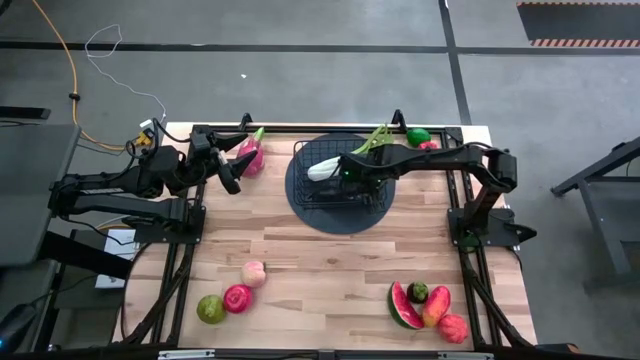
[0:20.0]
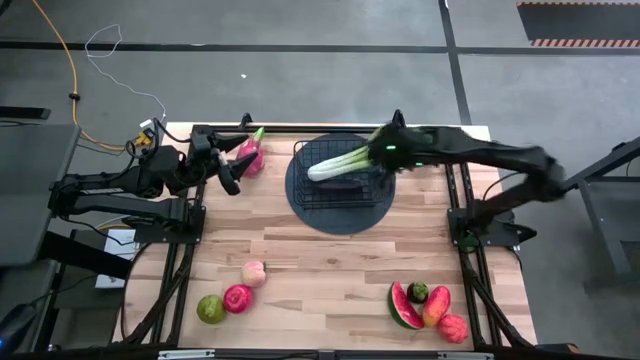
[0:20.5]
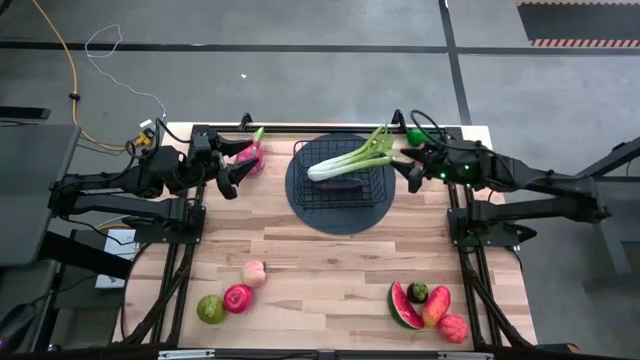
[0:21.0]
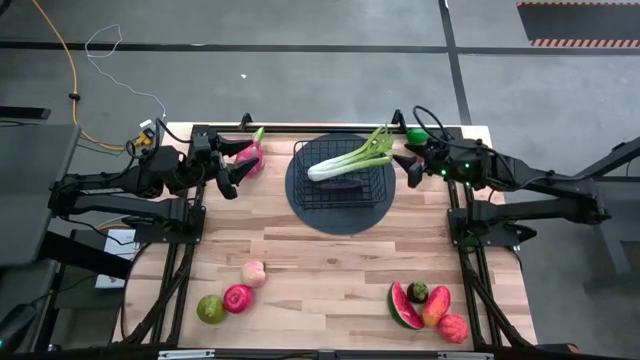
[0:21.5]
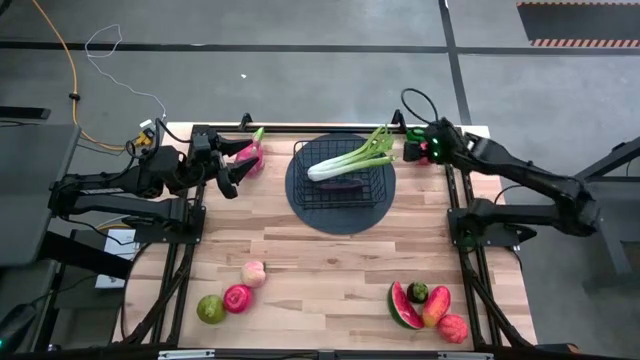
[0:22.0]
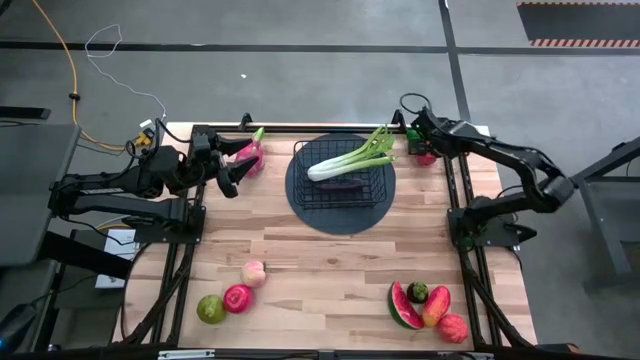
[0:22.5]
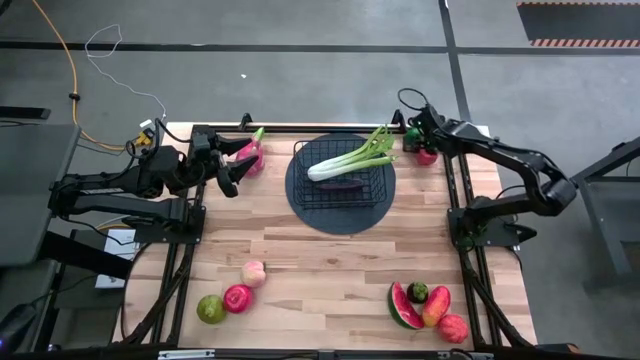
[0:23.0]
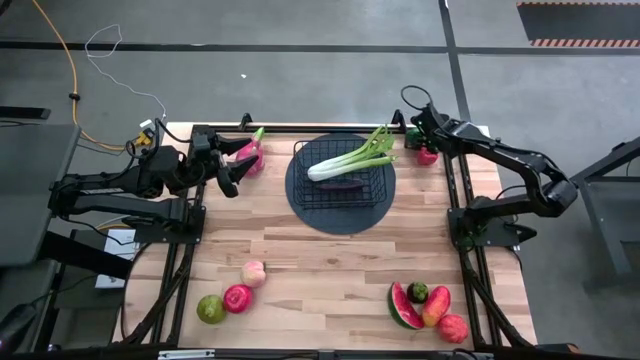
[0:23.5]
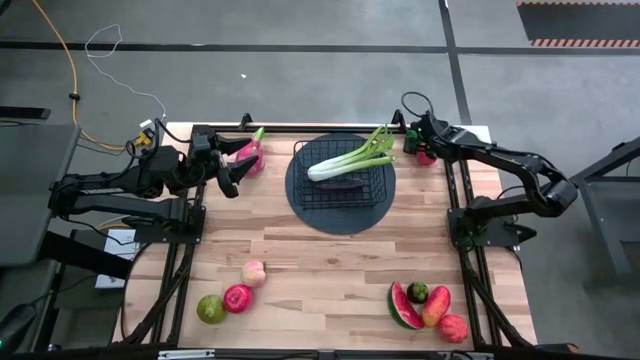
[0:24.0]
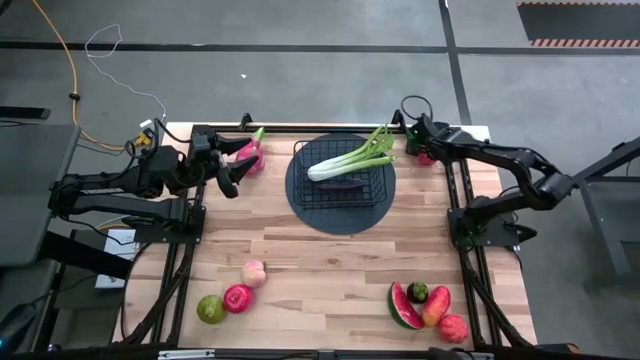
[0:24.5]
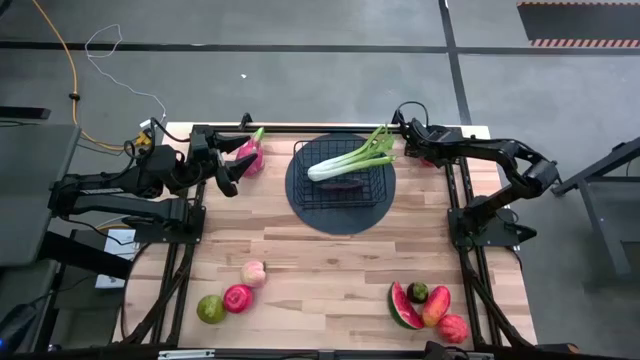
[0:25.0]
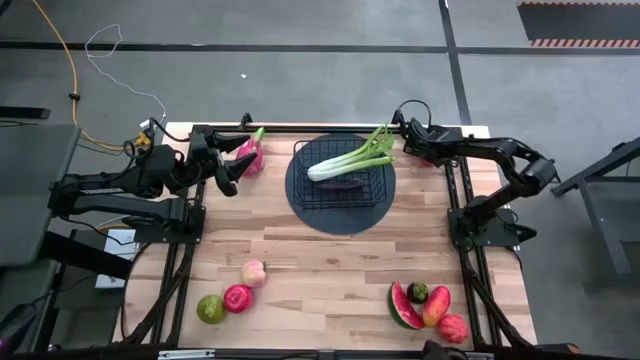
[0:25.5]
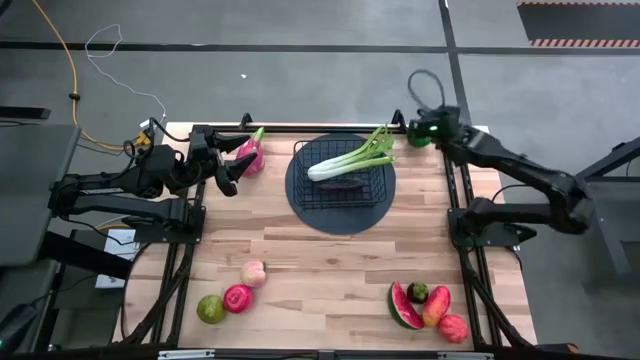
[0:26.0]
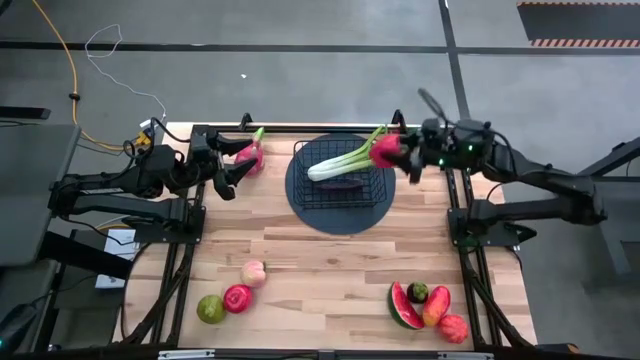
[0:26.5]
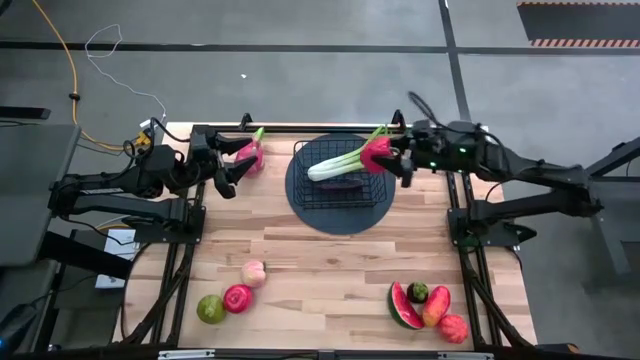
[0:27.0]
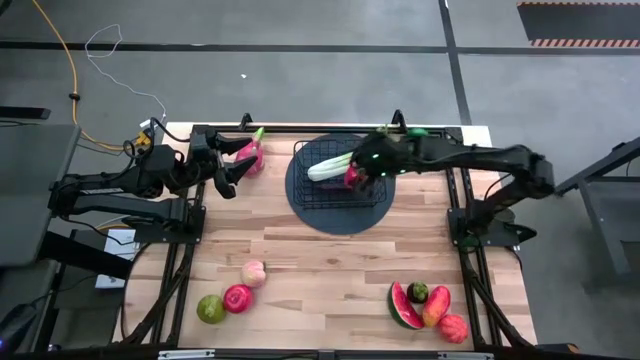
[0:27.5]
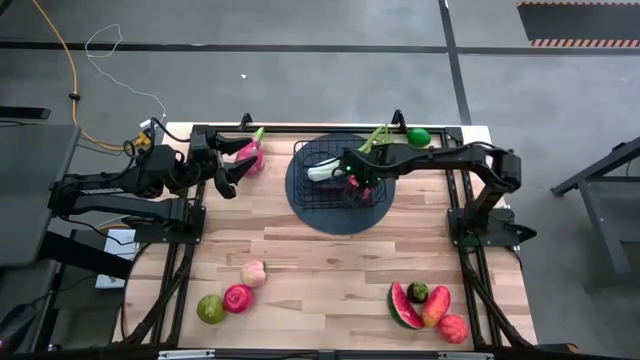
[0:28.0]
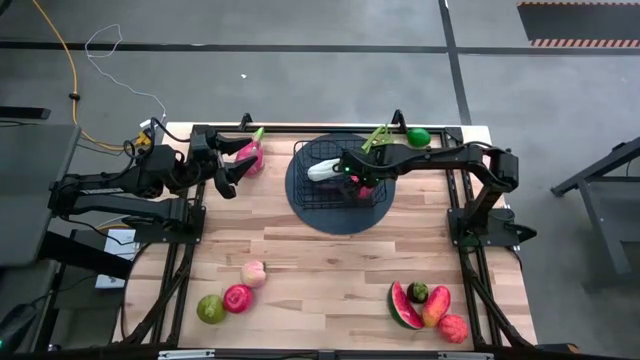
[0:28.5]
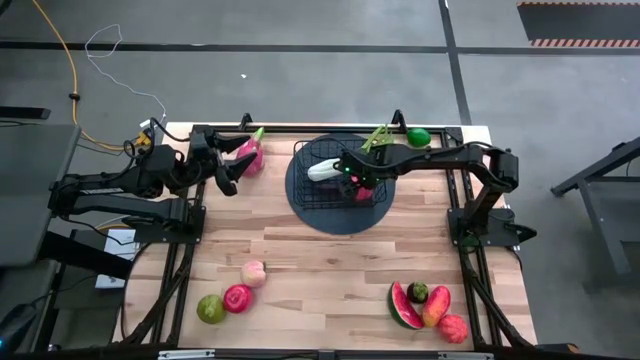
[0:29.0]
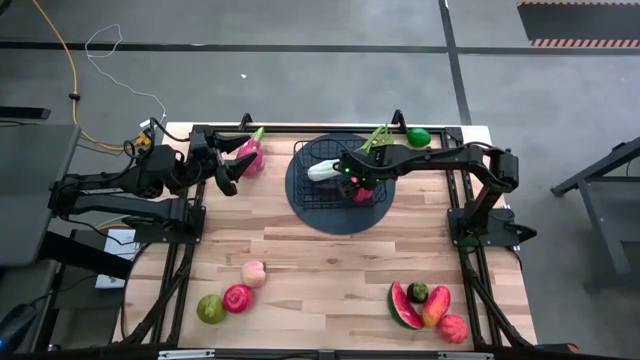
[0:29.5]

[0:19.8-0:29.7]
Task: Build produce basket
Put the bell pepper into the wire basket

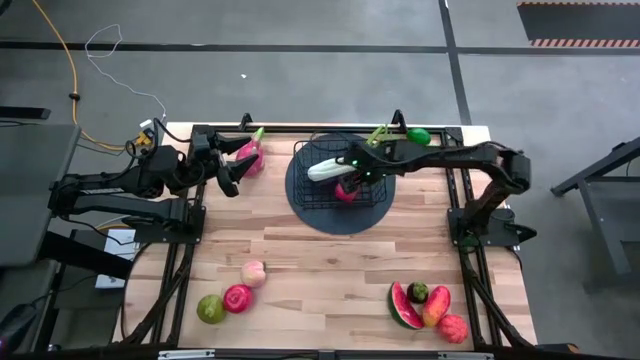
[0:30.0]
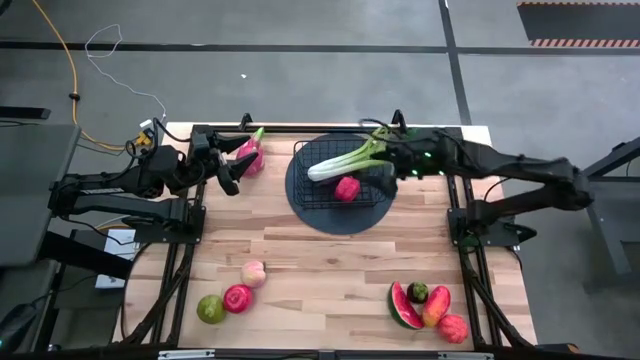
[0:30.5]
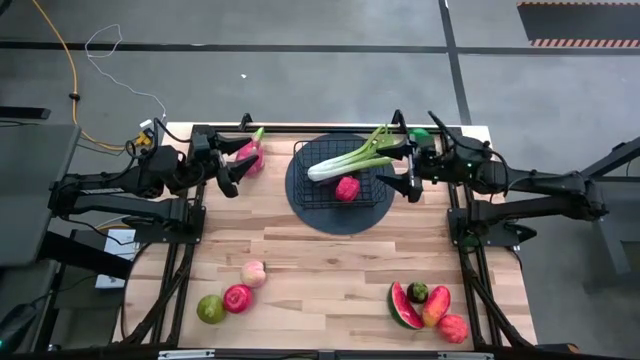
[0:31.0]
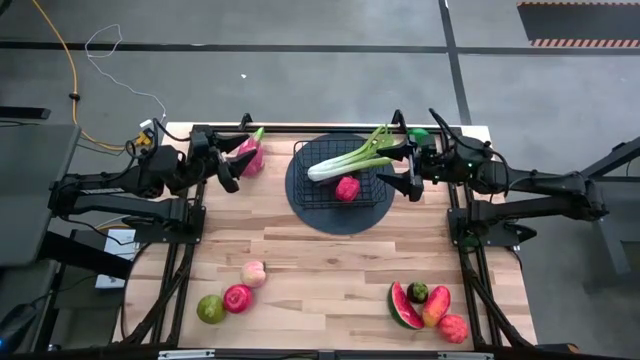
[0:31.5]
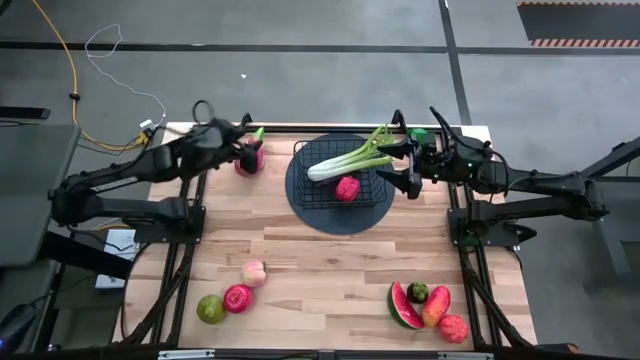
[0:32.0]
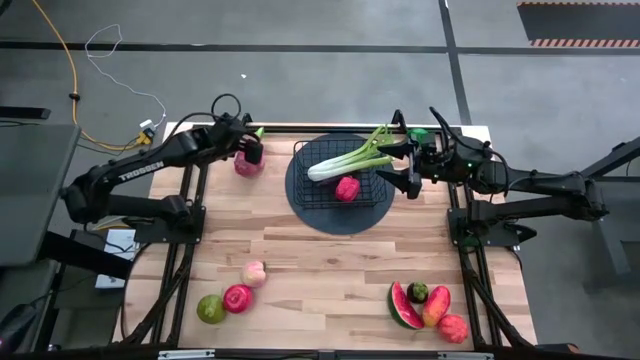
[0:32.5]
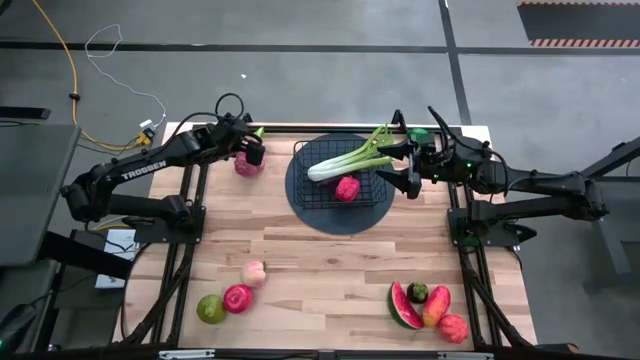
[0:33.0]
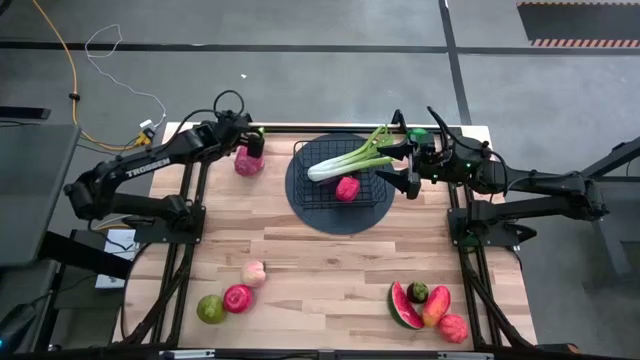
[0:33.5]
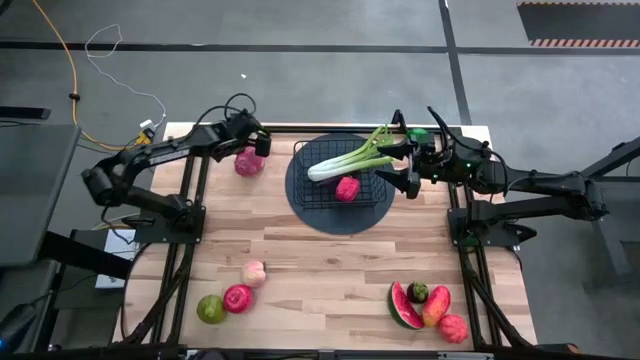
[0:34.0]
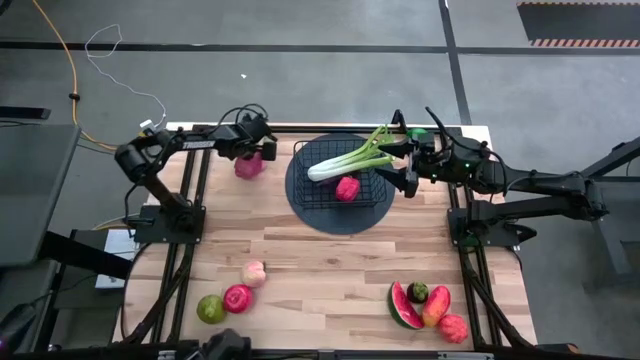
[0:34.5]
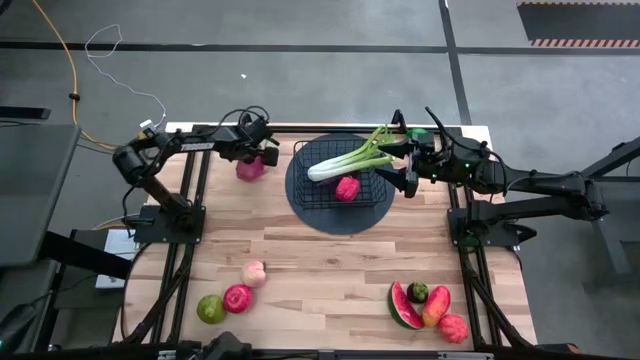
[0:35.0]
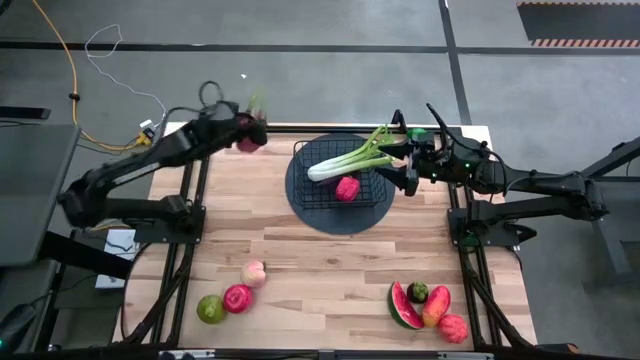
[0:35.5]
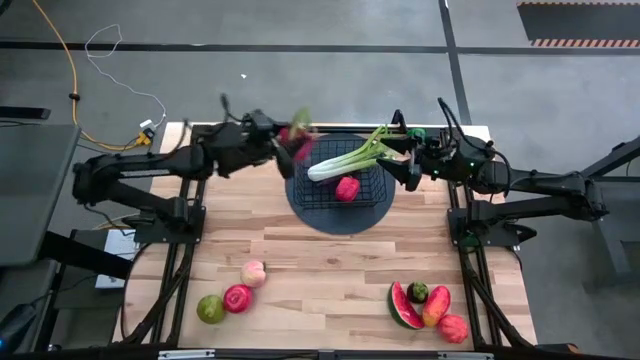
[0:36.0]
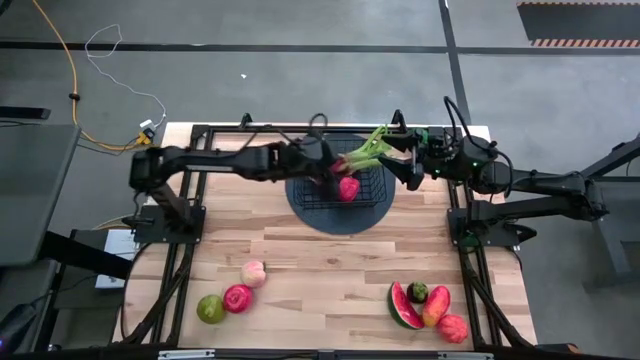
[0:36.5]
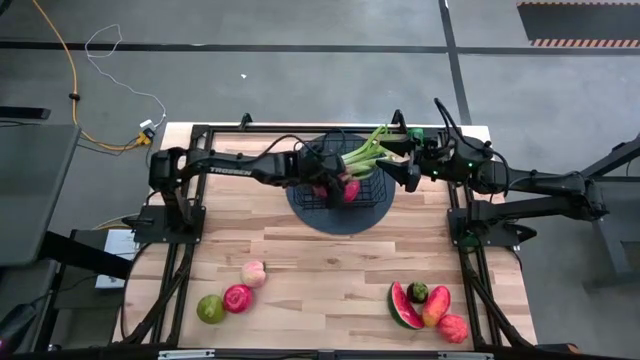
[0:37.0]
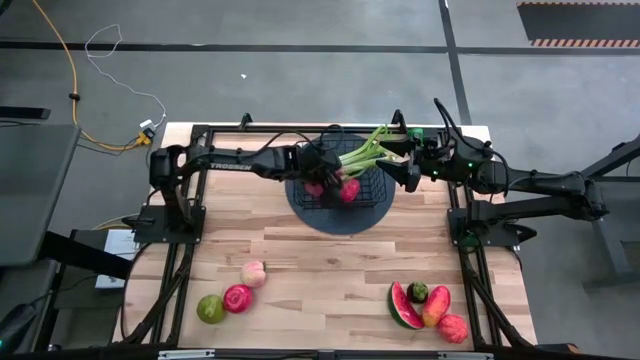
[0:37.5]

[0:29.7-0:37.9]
Put the dragon fruit into the wire basket

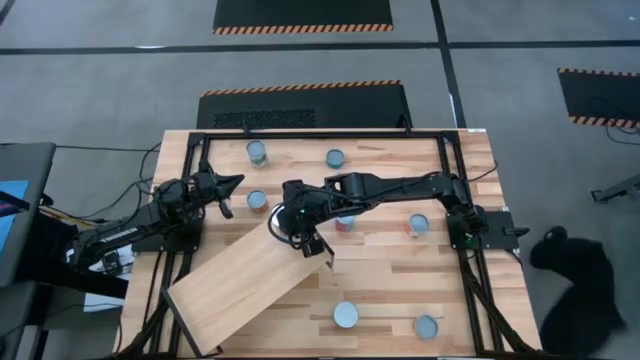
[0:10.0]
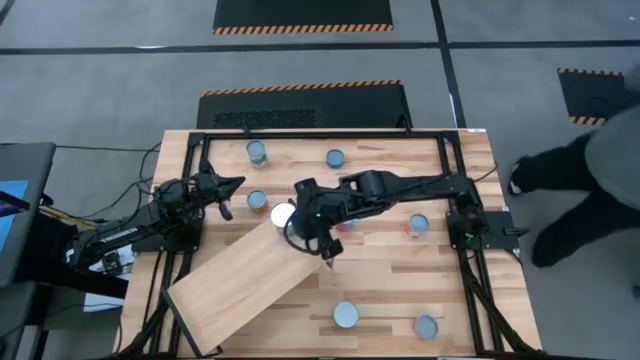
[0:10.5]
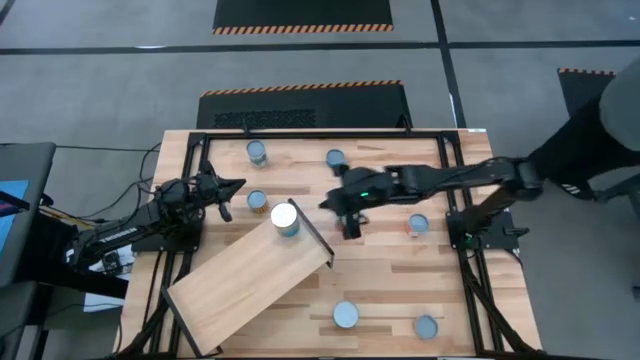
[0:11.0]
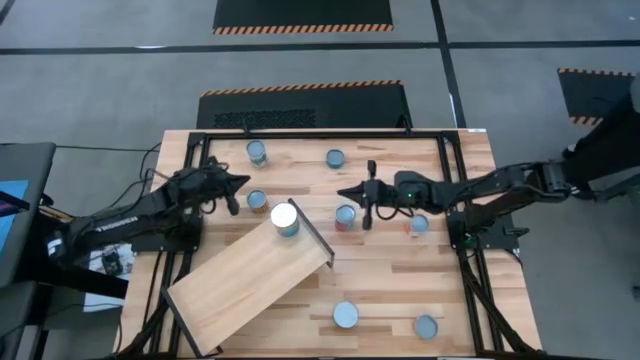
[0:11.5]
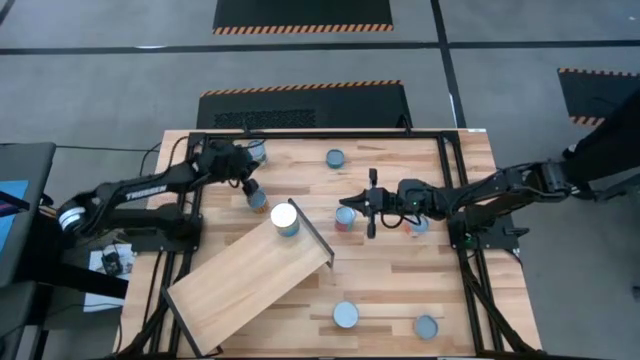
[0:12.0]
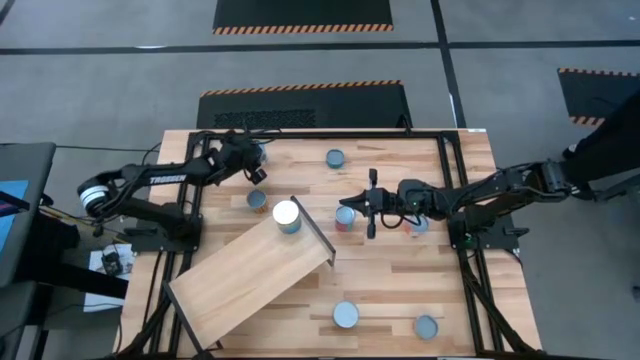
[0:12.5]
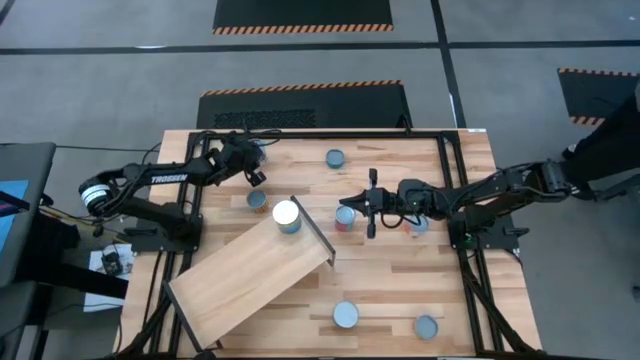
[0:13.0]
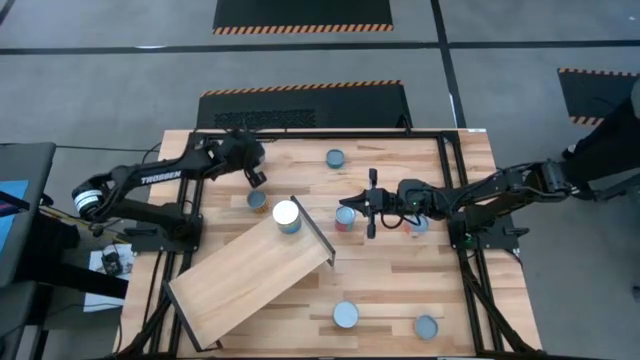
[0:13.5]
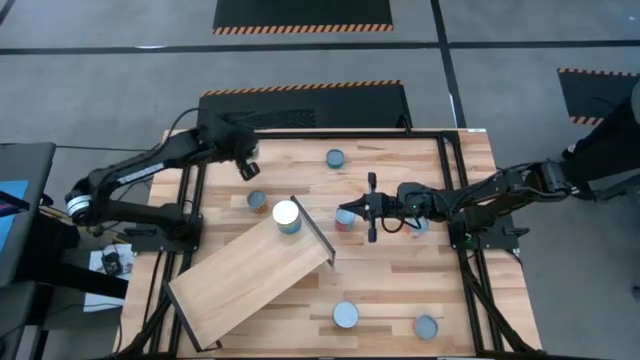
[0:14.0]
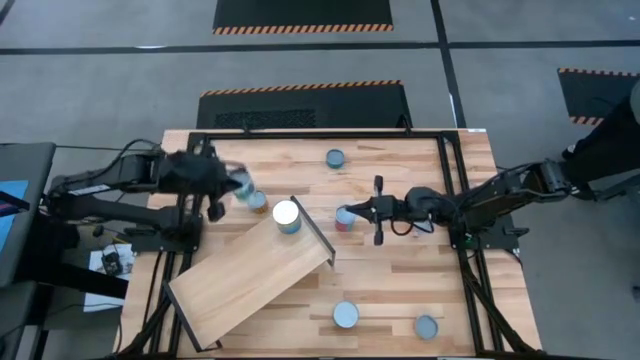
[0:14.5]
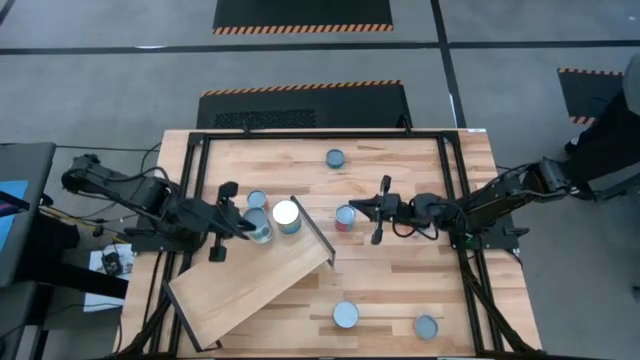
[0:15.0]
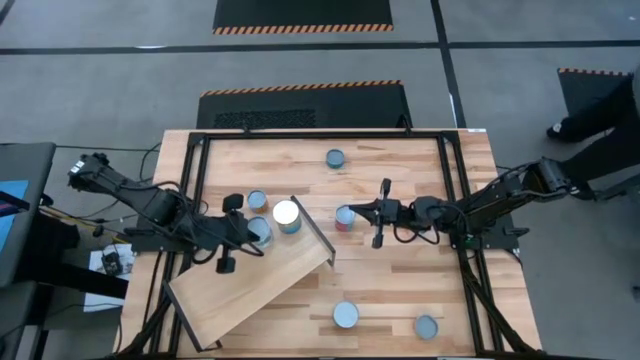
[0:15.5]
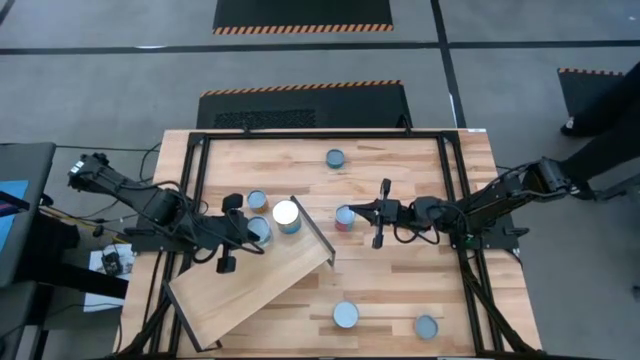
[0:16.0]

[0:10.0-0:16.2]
Task: Pick and place cans onto a shelf
Put the canned mixed vegetables on the shelf
